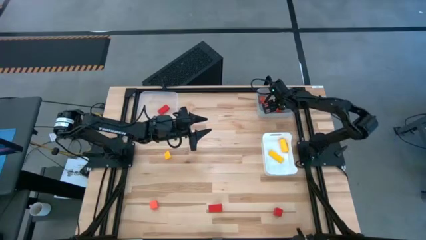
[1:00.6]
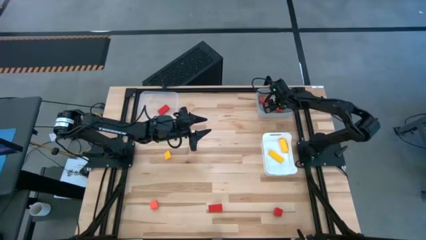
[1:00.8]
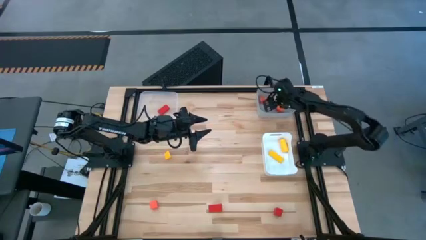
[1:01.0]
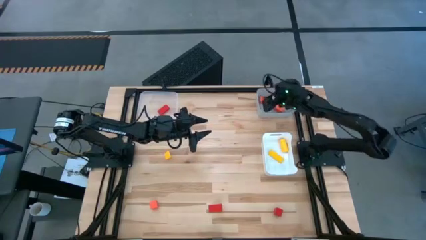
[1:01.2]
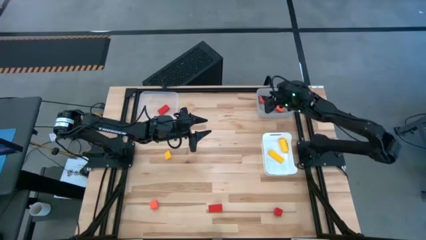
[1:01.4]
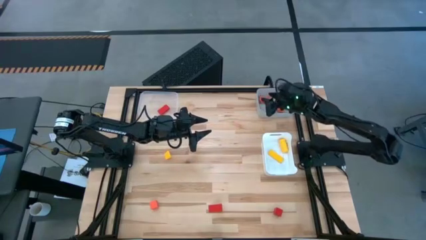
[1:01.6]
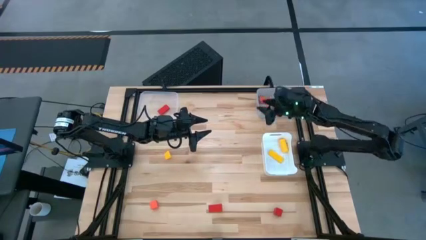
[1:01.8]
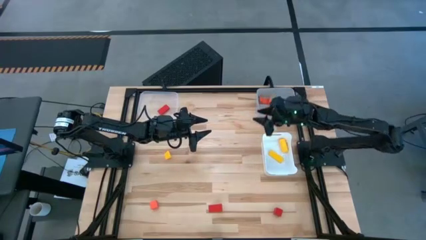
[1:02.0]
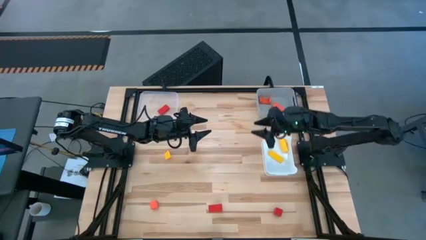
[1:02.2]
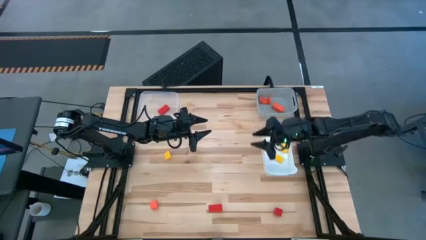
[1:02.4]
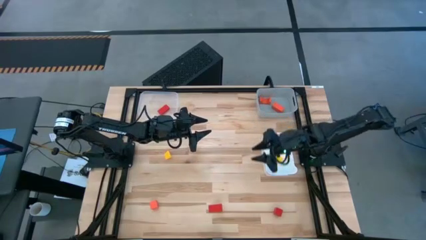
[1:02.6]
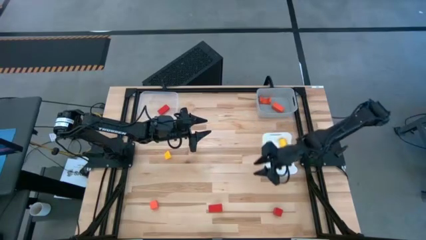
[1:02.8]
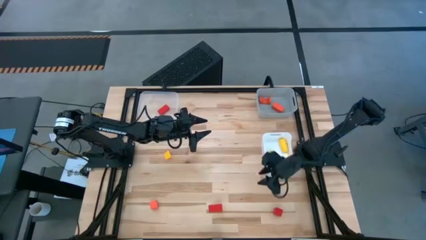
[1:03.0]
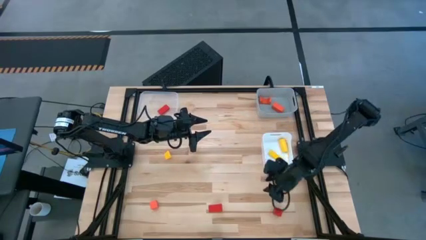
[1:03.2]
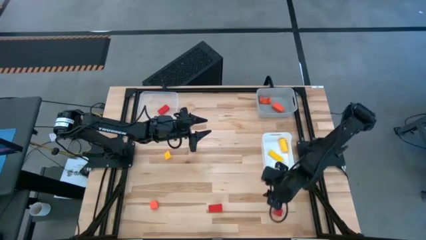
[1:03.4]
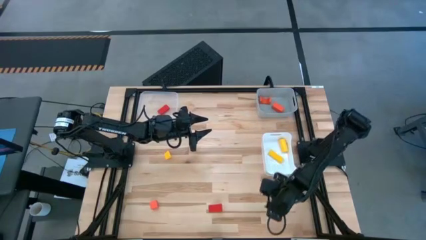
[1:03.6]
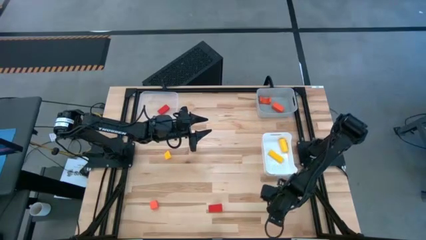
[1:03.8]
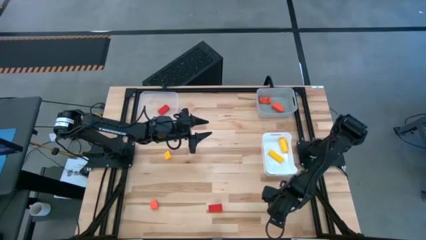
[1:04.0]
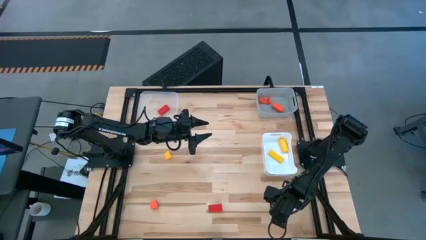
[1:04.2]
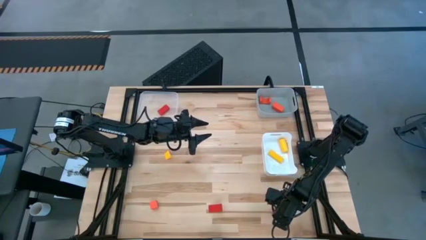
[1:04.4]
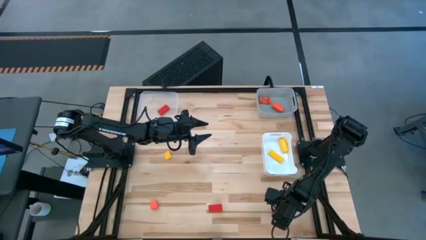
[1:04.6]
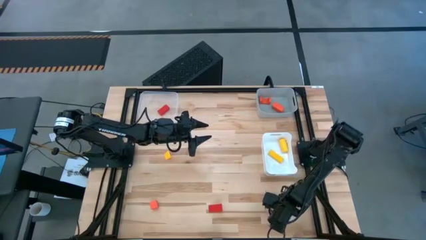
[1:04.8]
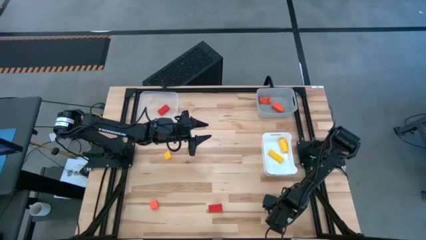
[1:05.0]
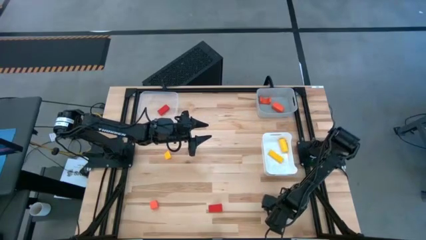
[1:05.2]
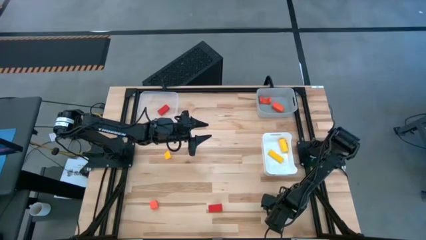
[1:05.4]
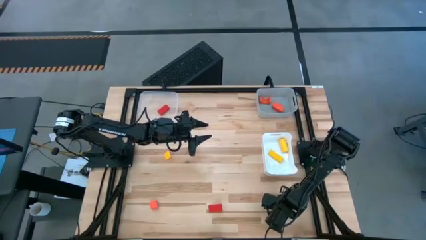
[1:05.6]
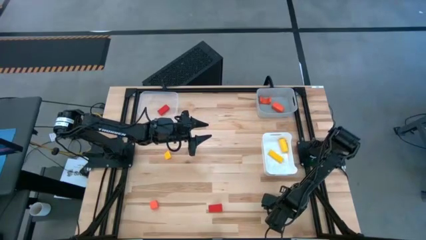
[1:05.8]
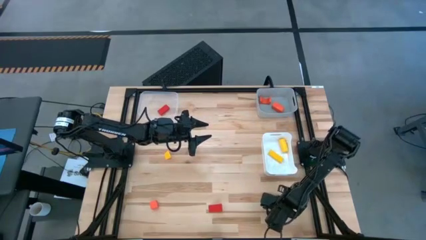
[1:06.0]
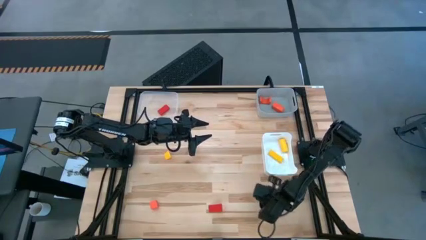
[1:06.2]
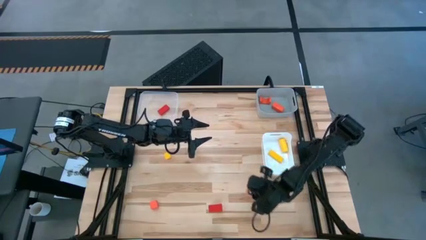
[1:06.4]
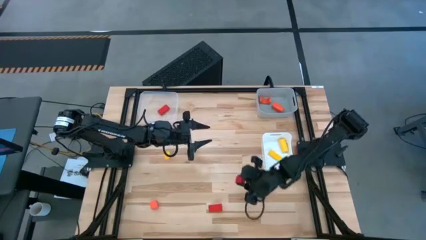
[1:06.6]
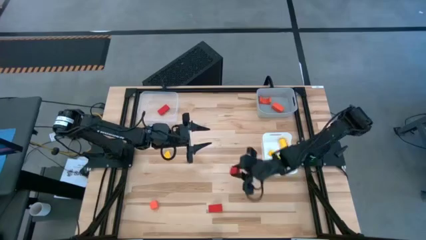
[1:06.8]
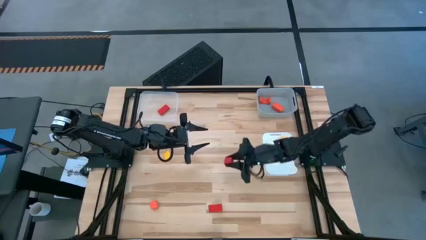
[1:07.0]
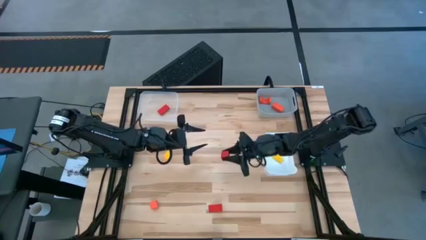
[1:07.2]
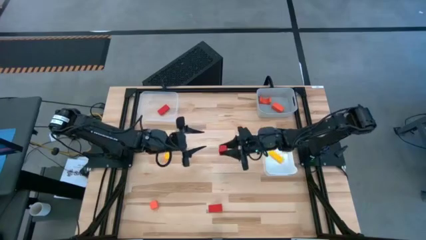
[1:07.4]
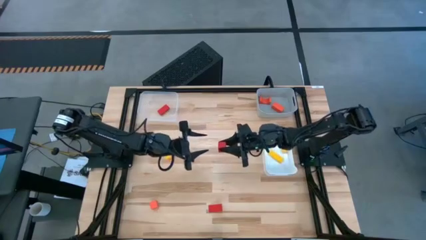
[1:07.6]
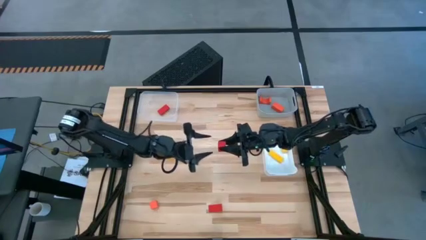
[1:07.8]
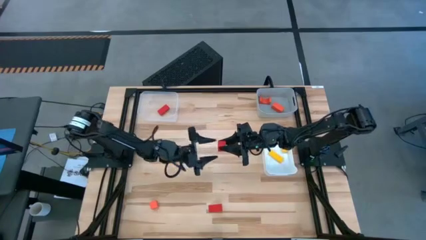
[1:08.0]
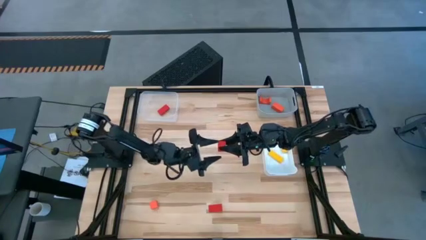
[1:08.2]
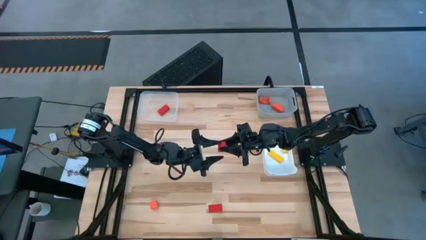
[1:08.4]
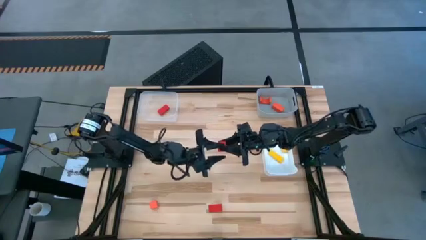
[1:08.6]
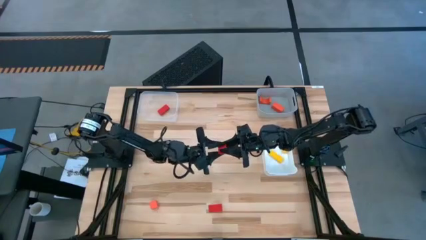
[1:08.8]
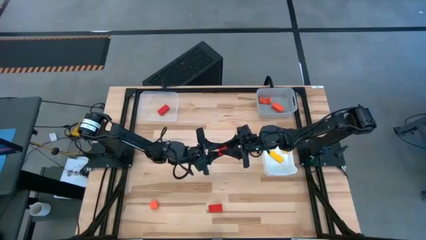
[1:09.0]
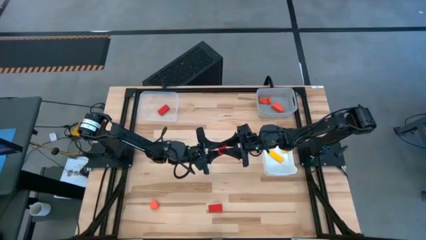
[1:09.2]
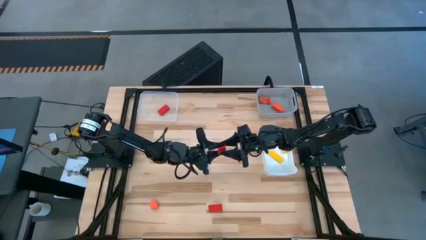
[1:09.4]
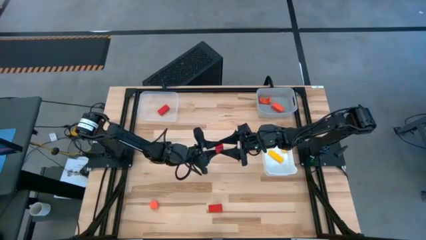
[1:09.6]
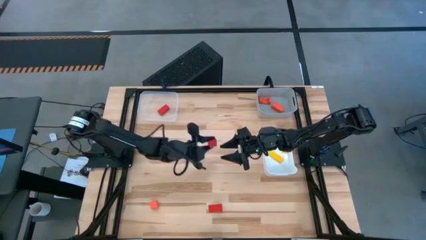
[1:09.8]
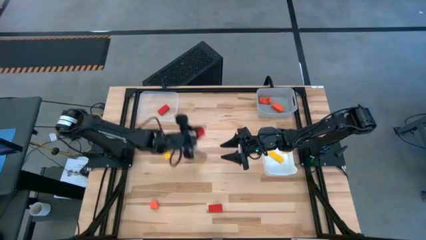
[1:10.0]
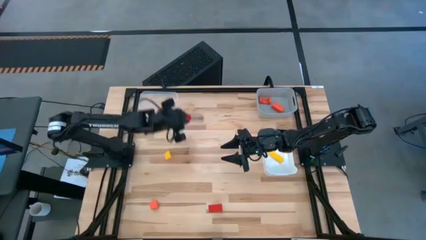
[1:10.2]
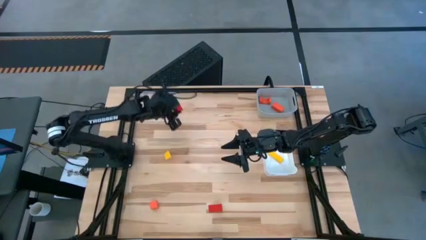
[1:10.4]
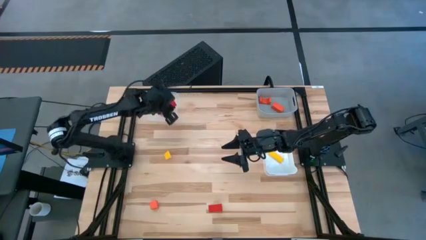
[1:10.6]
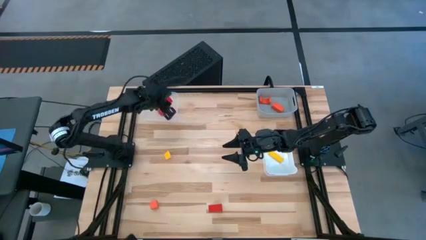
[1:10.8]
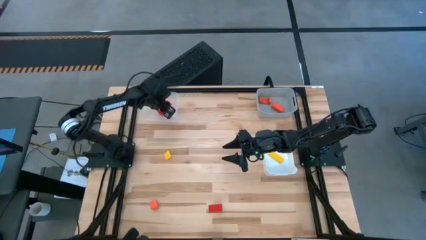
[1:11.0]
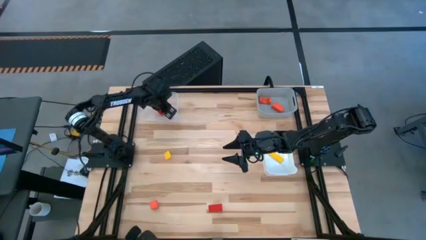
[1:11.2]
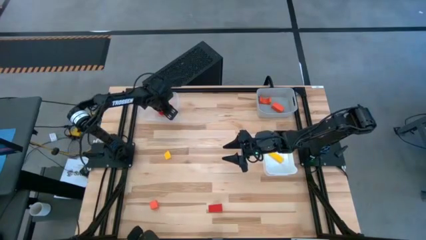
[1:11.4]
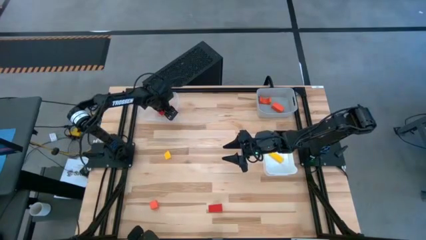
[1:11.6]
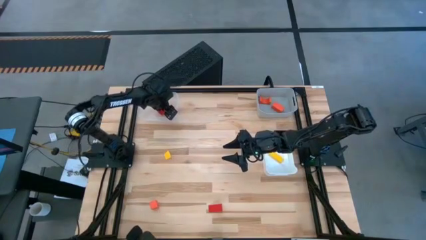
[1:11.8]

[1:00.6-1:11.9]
Task: Sort & place blocks by color
Put the right red block into the transparent bin

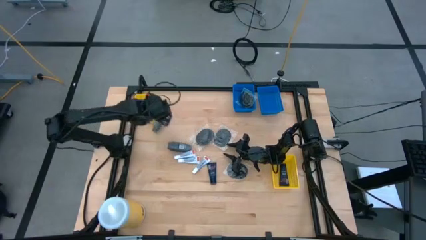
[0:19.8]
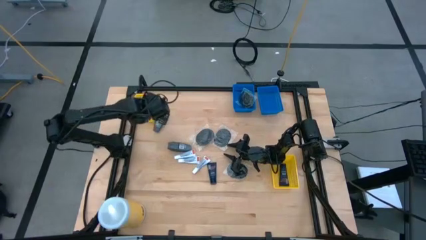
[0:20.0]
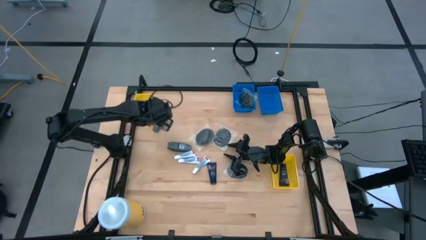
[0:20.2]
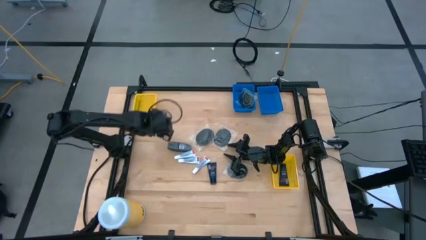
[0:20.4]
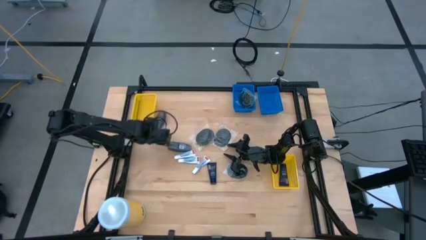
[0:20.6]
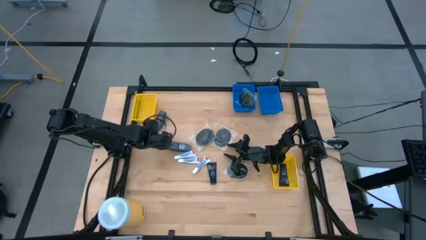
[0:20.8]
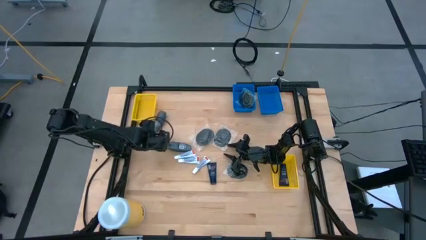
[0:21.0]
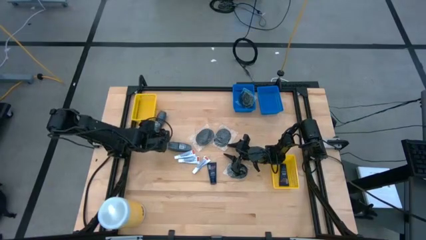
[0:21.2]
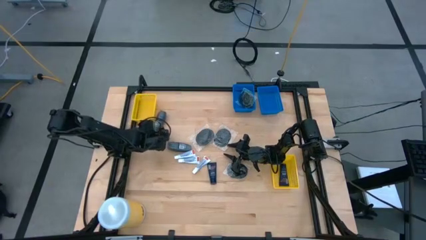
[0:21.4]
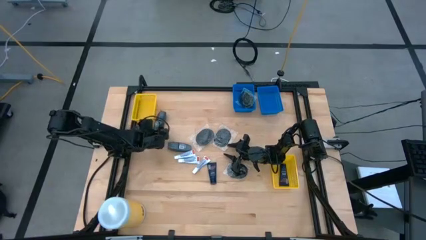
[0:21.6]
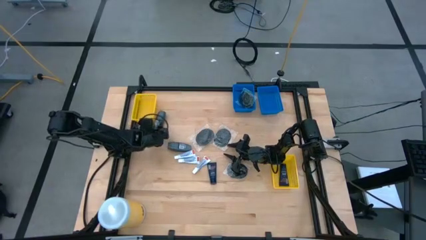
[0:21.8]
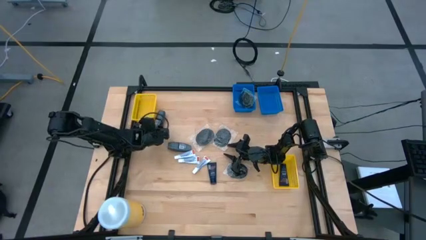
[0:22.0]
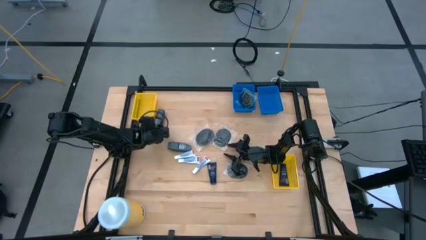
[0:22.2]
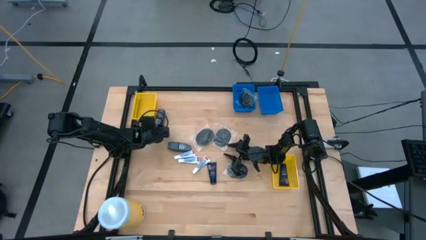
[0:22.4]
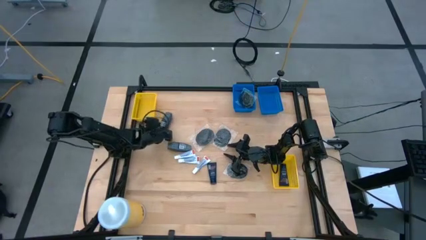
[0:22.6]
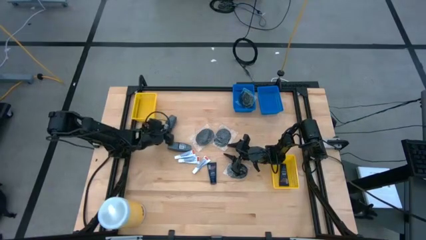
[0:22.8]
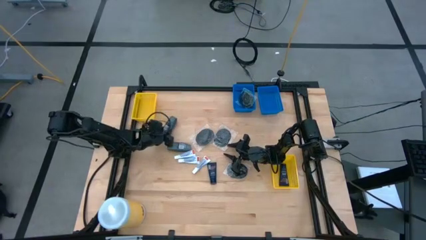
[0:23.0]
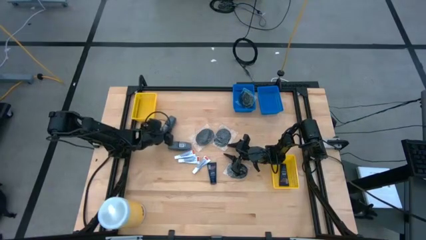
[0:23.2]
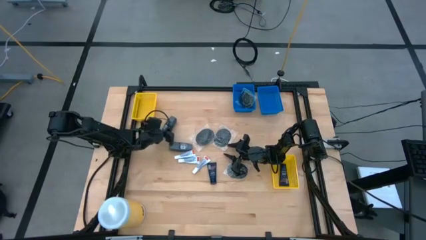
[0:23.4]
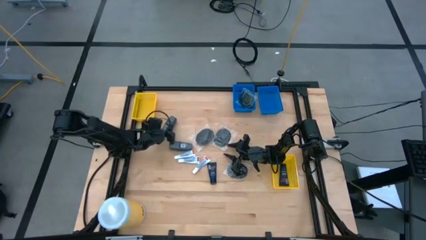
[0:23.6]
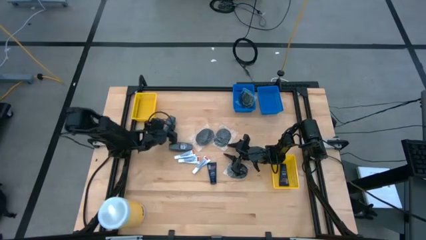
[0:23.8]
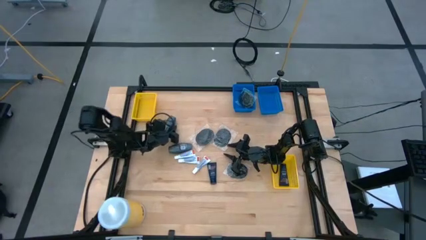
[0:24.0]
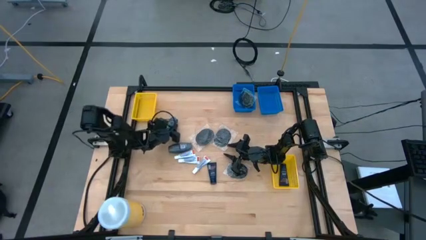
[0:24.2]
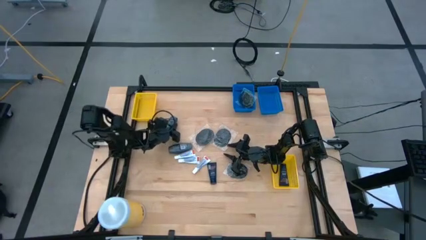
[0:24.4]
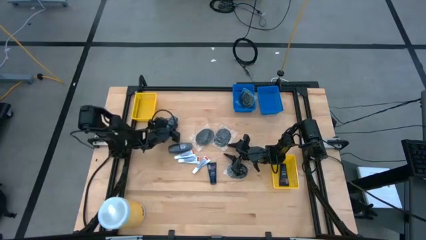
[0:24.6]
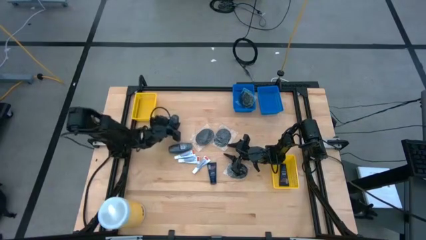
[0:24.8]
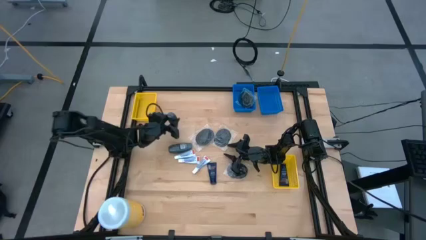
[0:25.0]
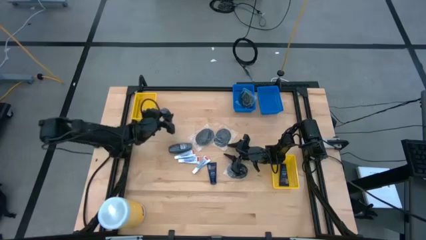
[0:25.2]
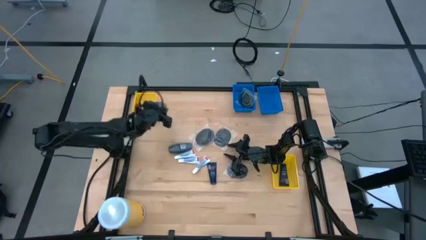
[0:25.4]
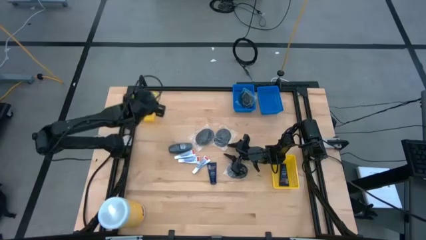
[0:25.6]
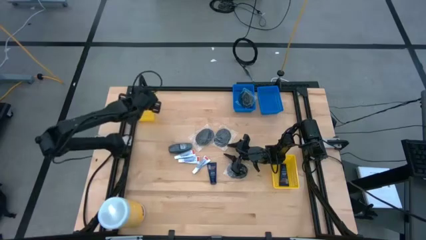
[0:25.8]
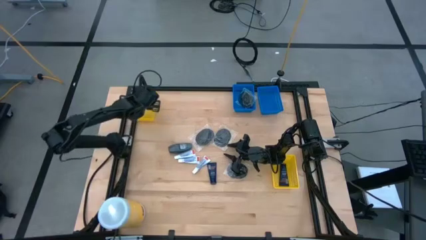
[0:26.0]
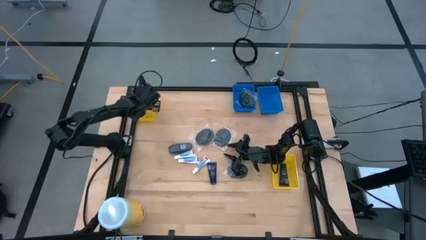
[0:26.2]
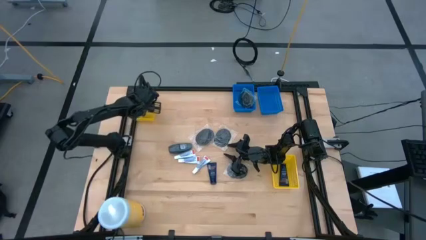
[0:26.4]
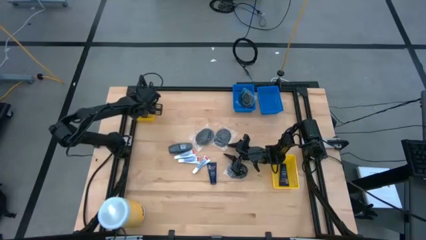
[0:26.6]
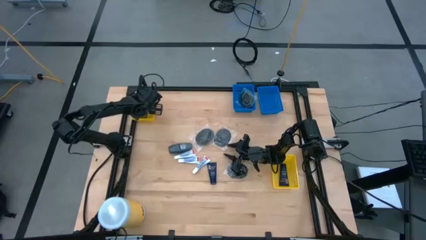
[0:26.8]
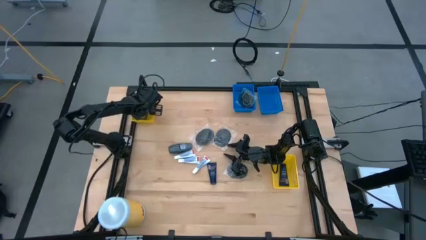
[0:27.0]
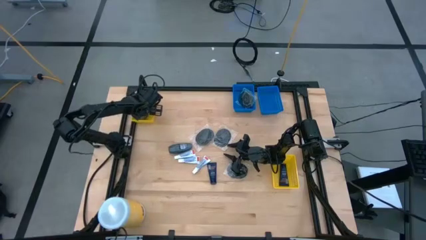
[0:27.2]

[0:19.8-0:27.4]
Task: Pick & Place Travel size toiletries
Put the deodorant into the right yellow bin
